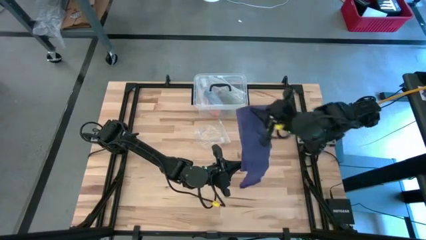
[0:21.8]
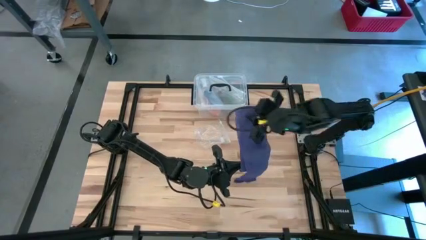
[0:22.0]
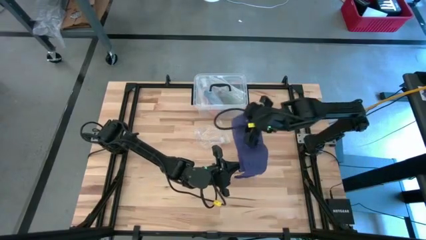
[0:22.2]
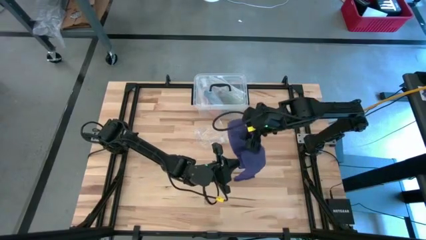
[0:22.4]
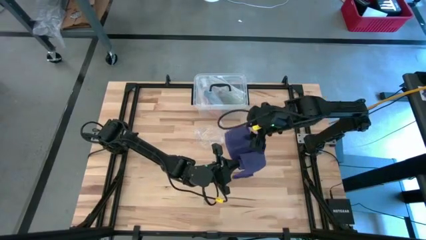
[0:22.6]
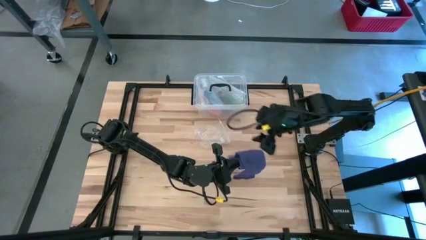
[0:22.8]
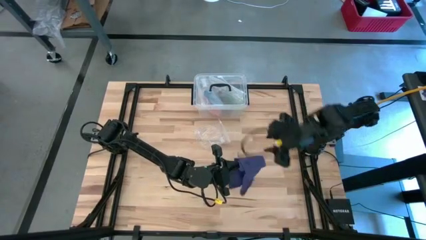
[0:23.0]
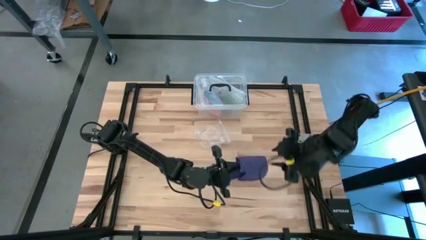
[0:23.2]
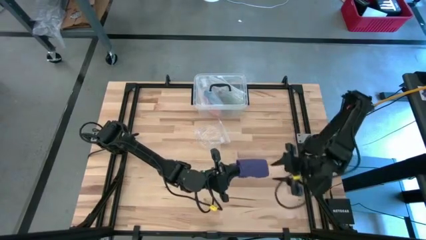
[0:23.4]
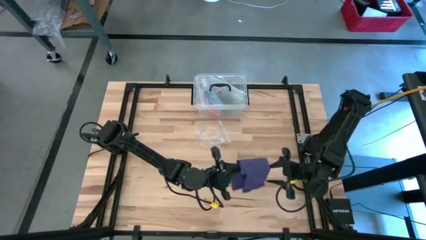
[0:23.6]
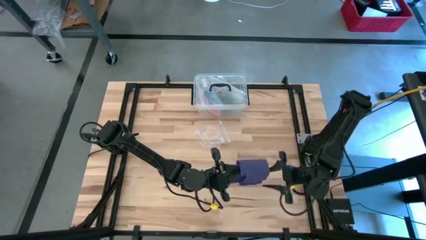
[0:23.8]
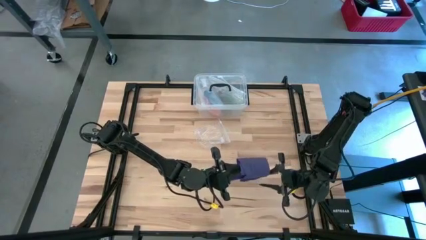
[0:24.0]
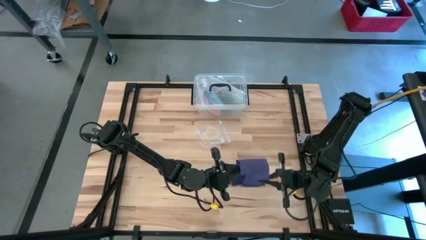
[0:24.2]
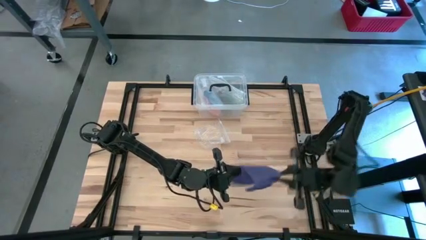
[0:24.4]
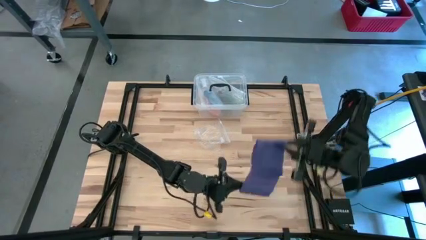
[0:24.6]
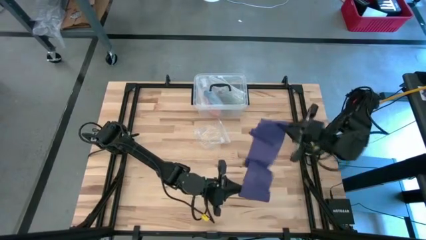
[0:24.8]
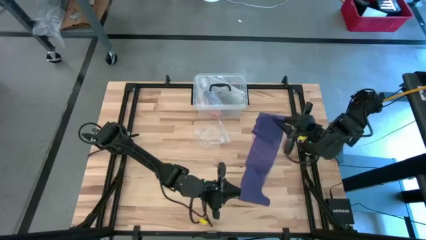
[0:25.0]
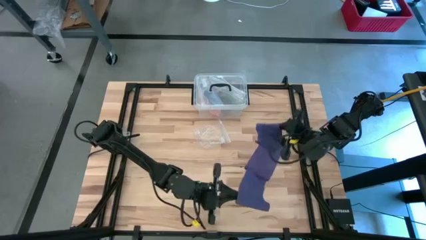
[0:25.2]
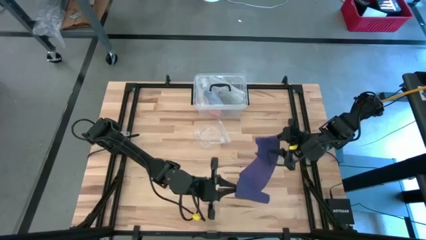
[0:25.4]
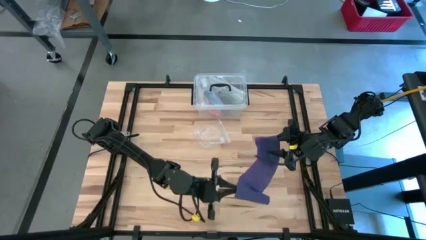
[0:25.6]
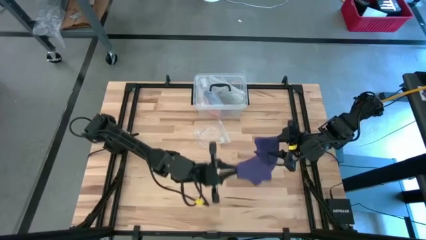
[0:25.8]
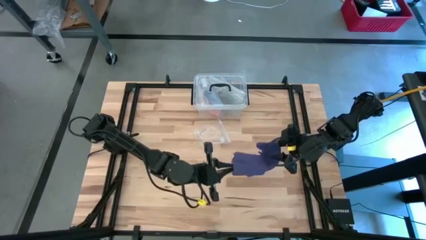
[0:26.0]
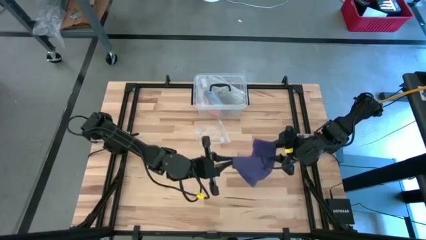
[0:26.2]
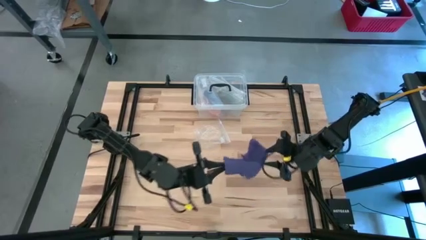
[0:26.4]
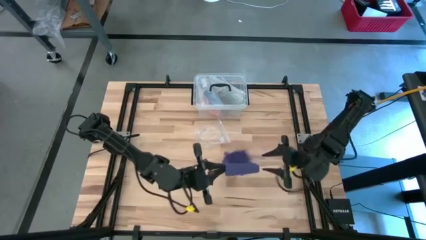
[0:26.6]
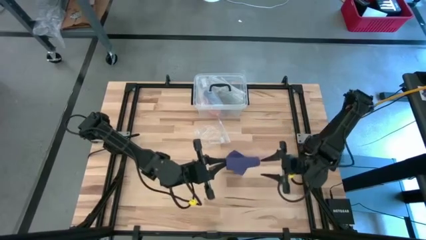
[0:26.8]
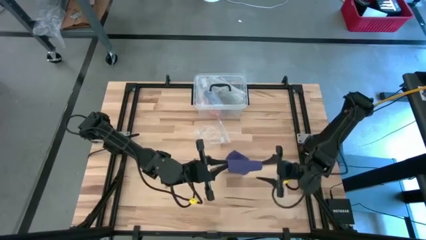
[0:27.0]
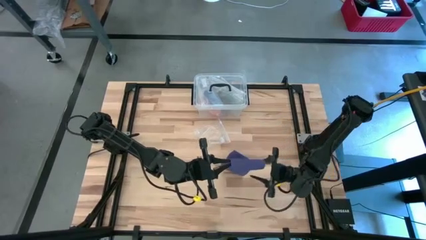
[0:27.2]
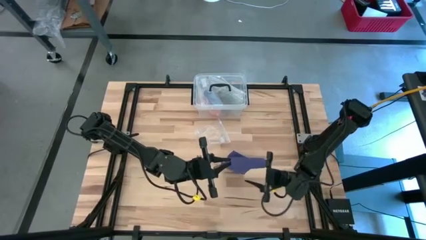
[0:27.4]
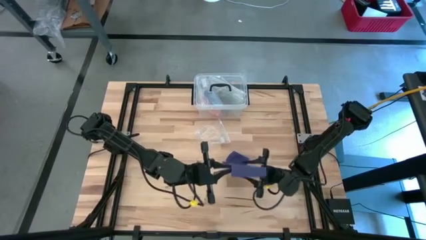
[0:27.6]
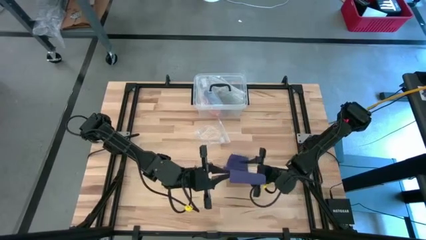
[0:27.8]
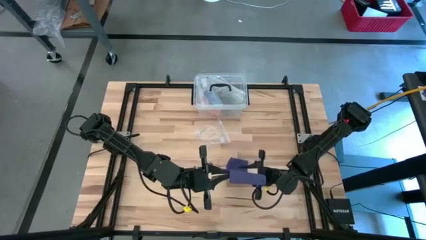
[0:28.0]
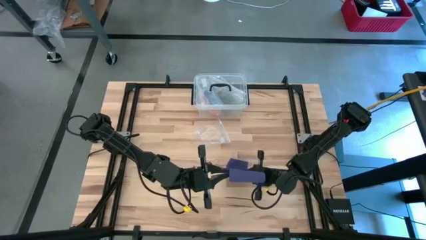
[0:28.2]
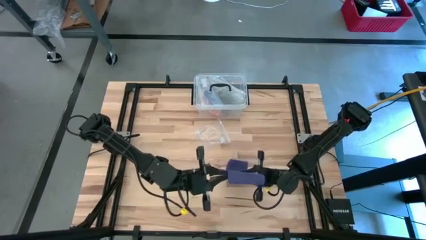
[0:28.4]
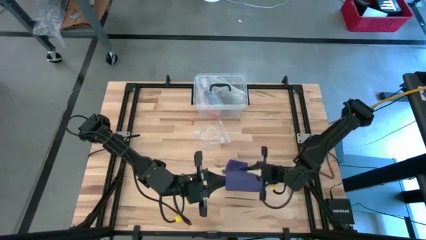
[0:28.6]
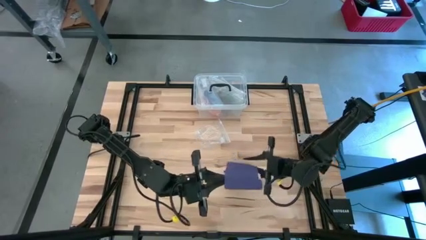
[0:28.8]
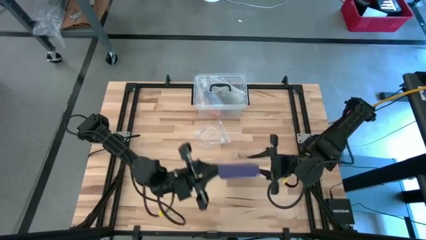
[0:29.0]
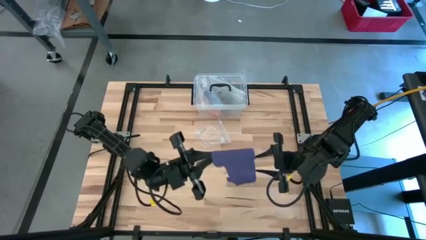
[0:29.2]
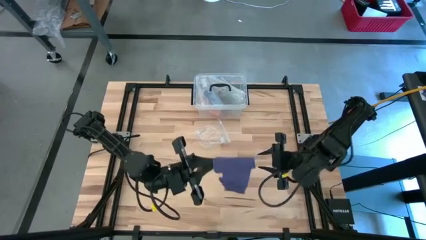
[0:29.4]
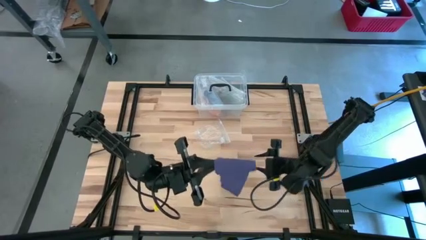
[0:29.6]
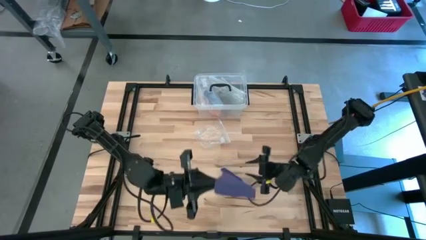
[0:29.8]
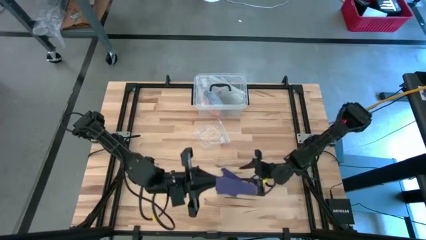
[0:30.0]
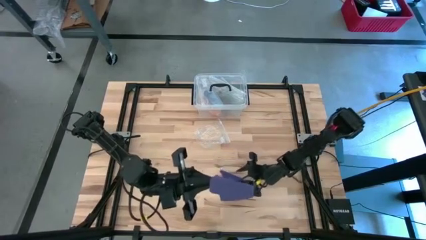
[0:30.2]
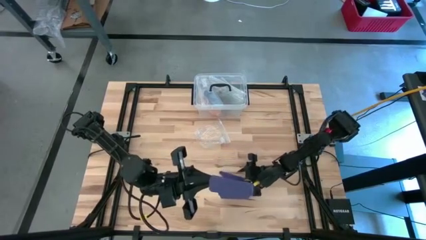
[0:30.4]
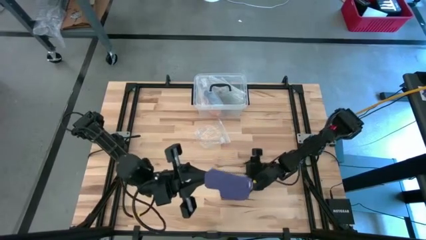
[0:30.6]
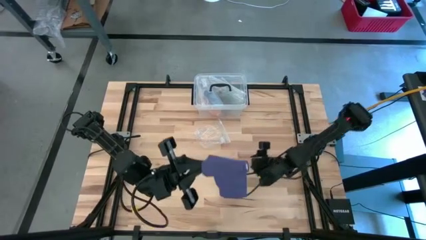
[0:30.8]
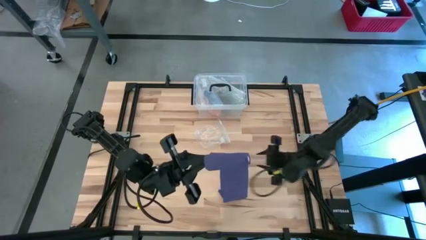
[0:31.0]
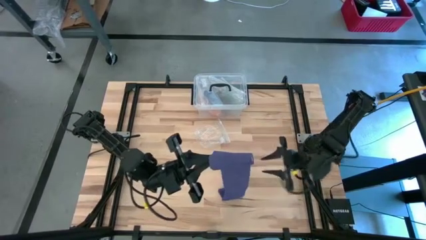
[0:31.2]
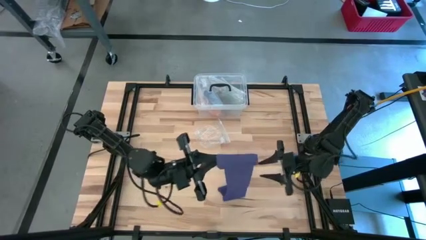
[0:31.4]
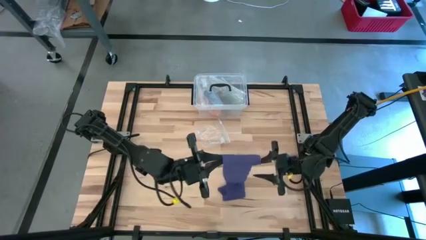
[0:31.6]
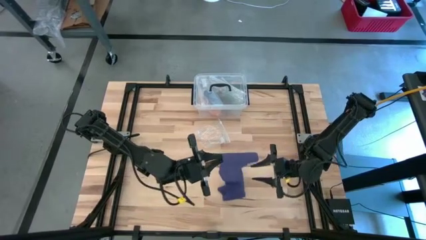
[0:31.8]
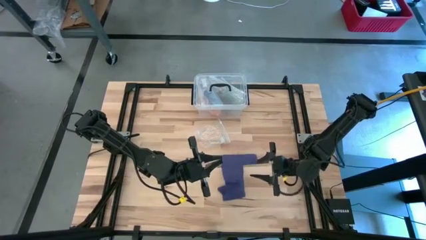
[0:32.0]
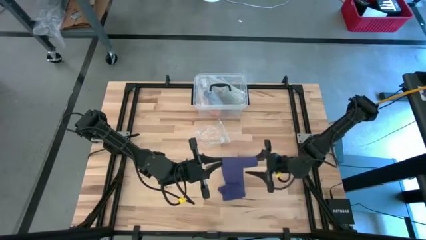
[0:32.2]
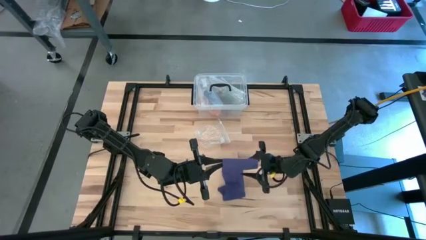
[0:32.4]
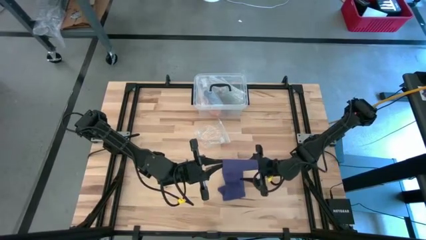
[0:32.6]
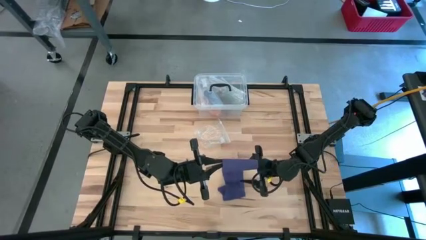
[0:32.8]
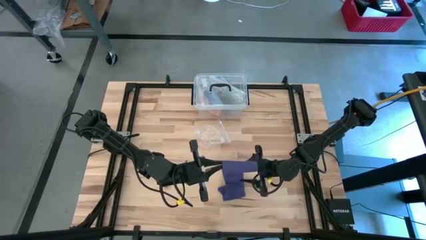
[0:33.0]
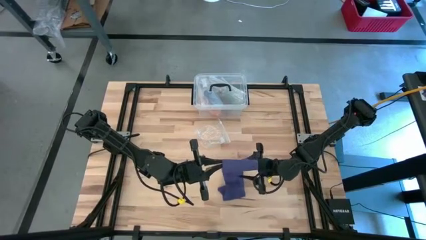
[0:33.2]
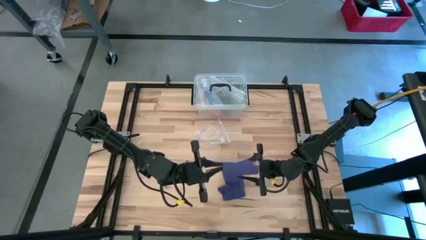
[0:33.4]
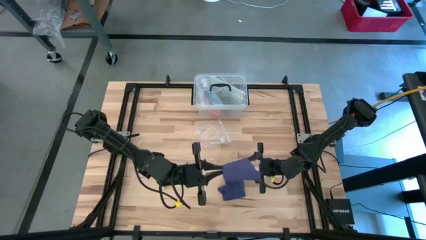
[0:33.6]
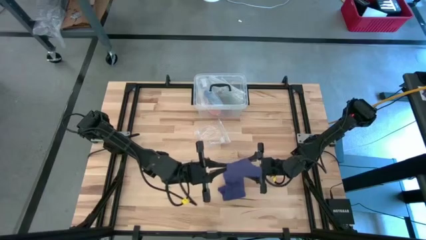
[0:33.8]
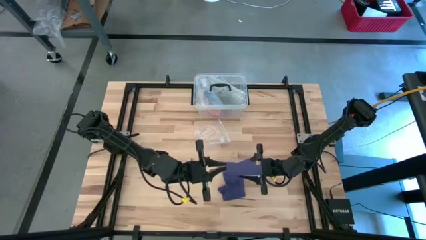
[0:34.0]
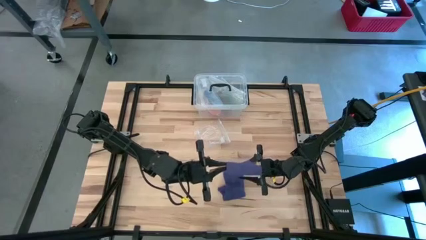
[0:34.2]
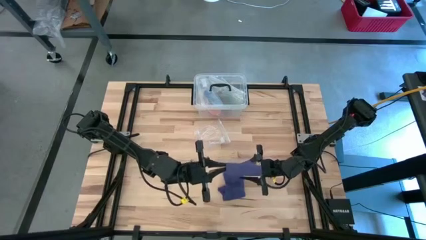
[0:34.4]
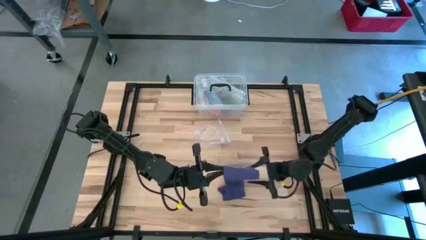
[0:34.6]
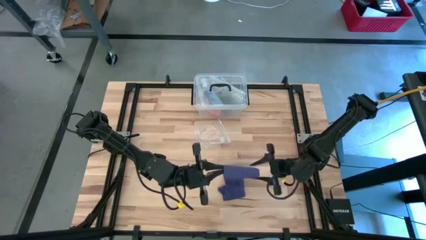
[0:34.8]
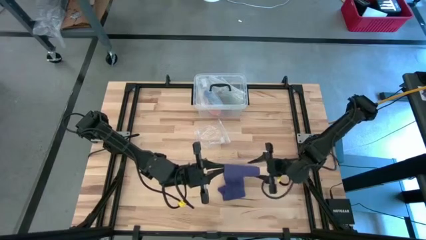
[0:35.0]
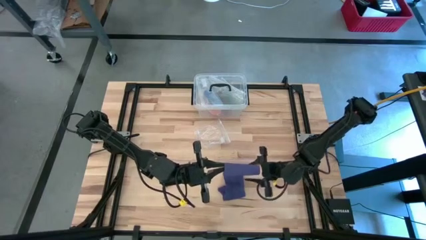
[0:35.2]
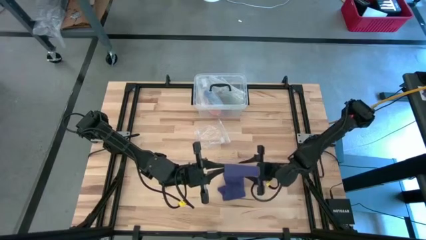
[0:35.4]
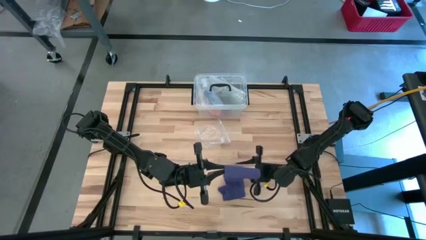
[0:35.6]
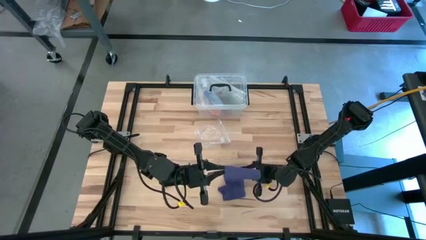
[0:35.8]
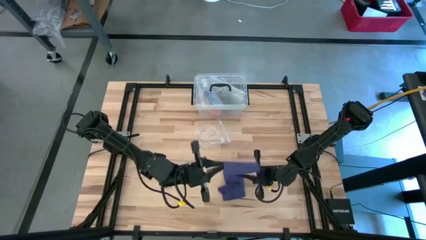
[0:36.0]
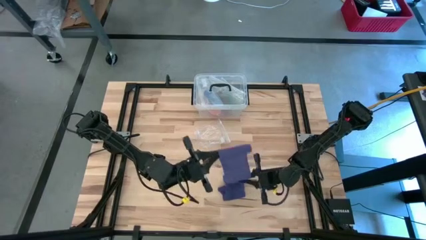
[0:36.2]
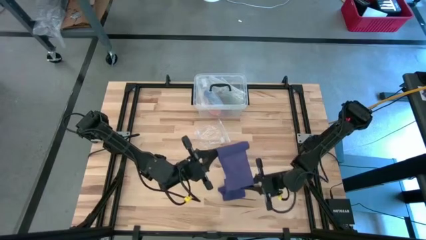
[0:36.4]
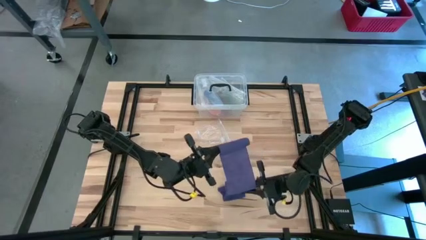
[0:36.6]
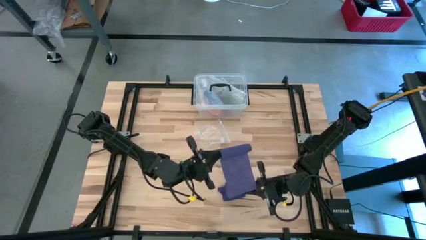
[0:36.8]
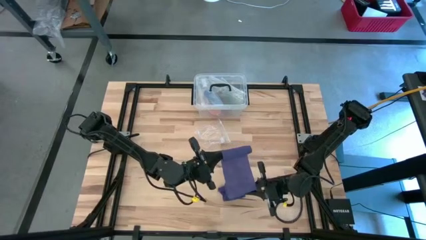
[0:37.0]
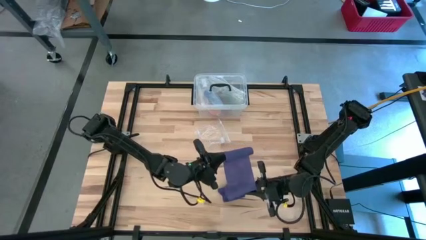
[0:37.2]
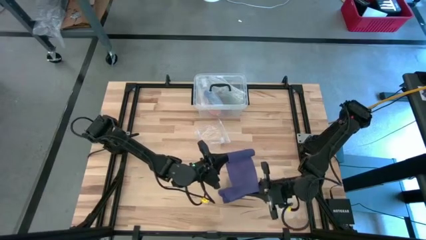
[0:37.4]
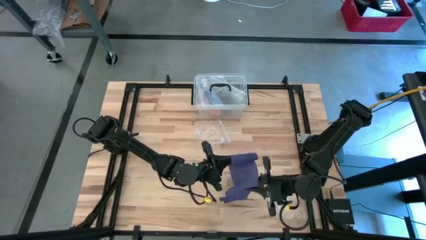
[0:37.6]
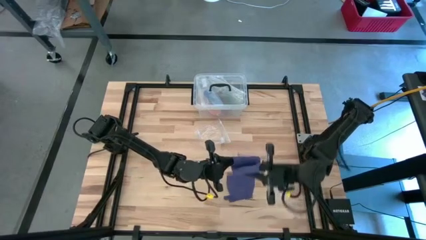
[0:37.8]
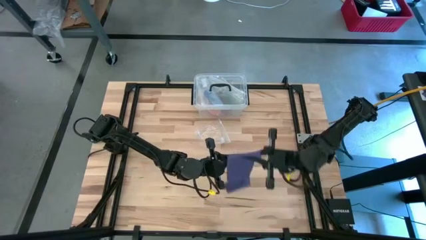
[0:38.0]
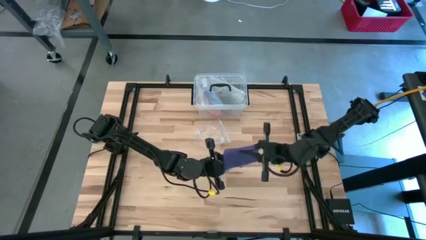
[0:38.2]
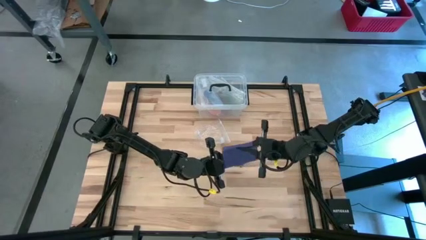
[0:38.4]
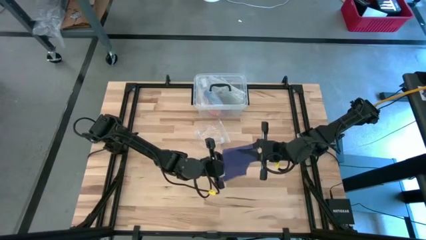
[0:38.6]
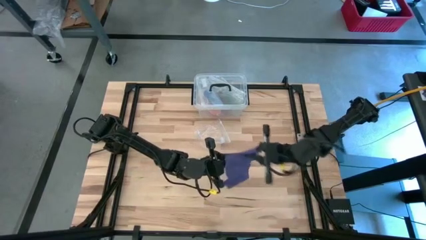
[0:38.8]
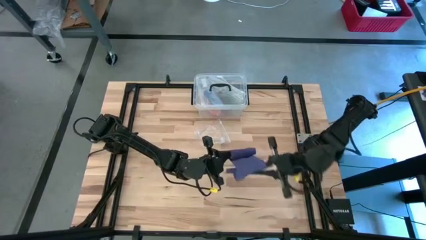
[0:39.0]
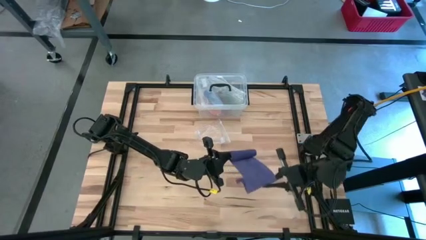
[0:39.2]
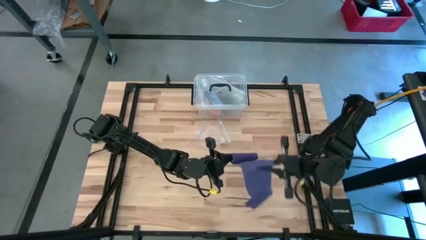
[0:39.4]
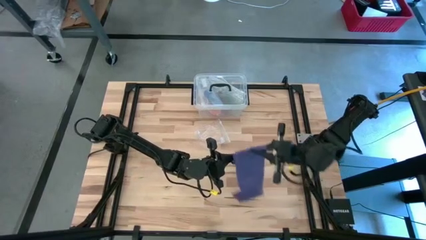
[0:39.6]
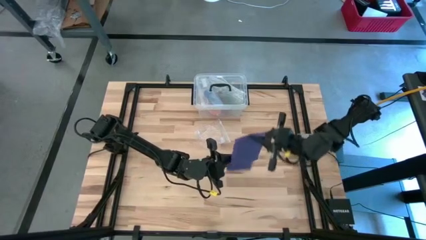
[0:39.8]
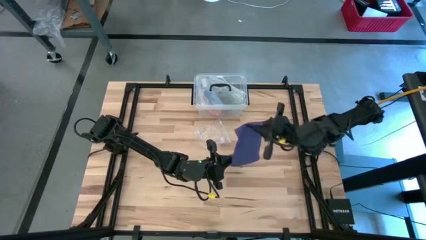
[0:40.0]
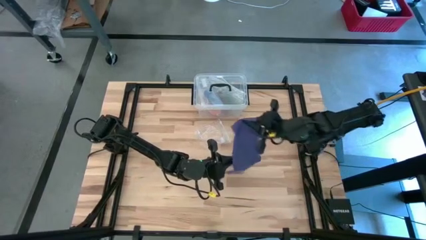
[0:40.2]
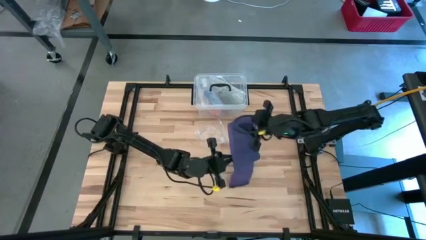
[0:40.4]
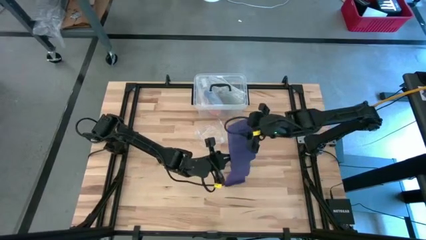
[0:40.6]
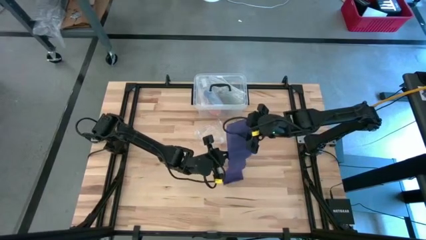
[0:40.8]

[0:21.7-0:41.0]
Task: Roll bandage
Roll the blue bandage
